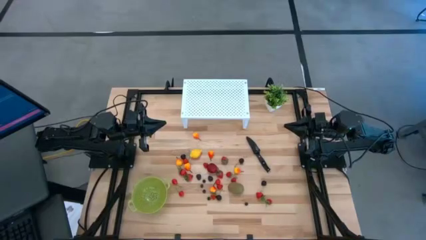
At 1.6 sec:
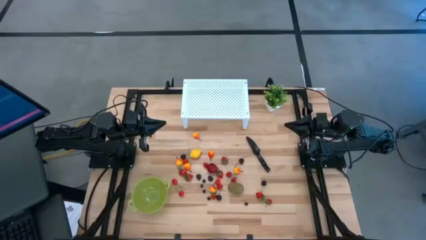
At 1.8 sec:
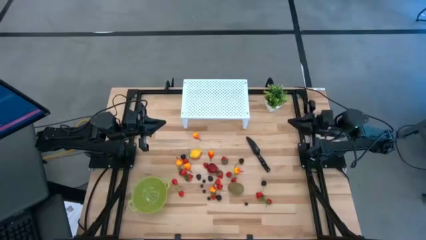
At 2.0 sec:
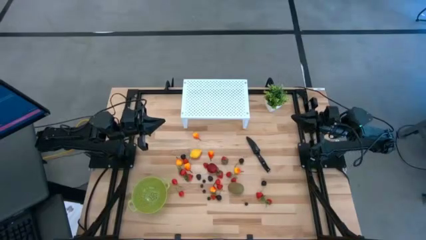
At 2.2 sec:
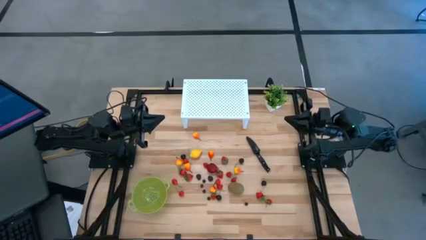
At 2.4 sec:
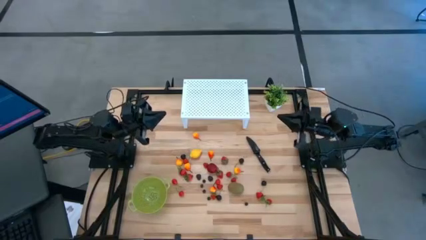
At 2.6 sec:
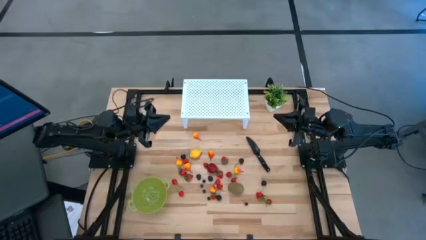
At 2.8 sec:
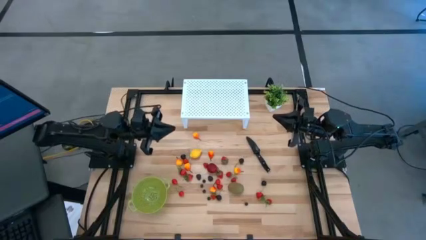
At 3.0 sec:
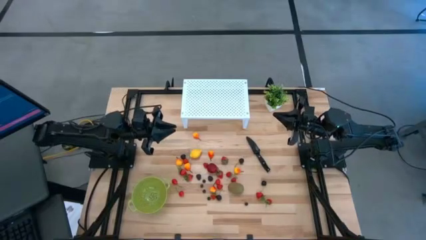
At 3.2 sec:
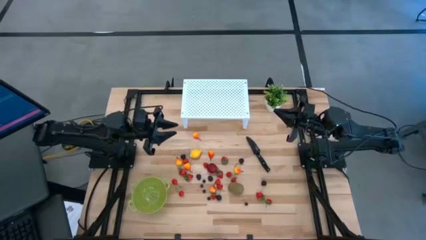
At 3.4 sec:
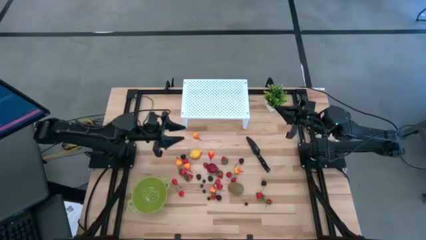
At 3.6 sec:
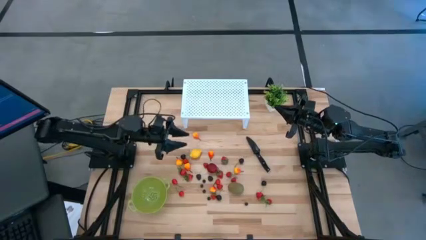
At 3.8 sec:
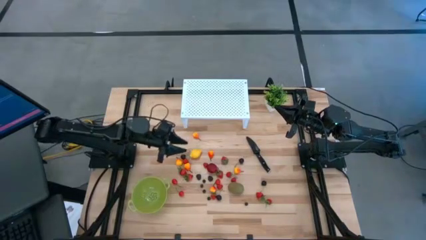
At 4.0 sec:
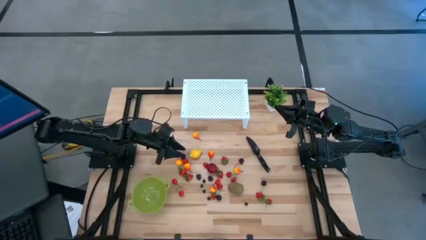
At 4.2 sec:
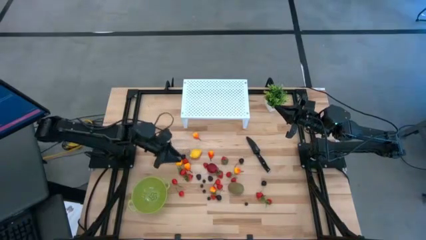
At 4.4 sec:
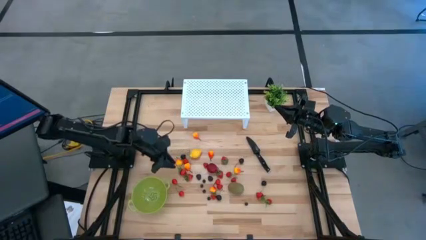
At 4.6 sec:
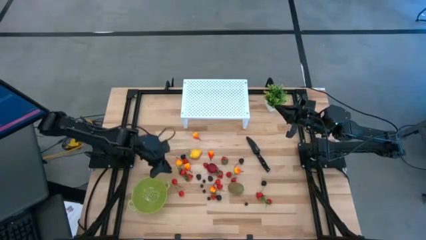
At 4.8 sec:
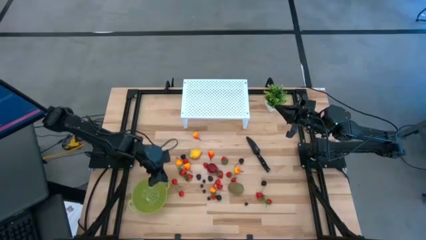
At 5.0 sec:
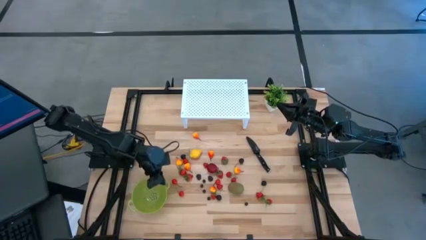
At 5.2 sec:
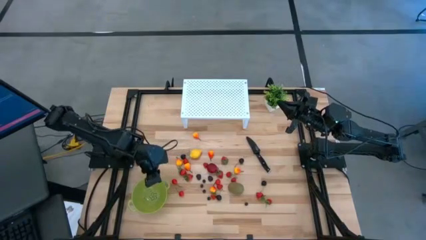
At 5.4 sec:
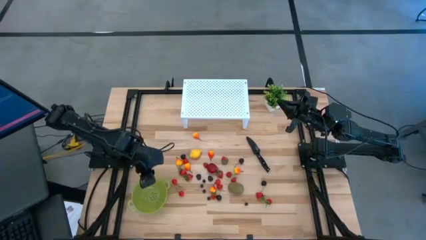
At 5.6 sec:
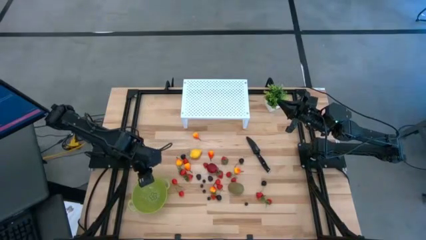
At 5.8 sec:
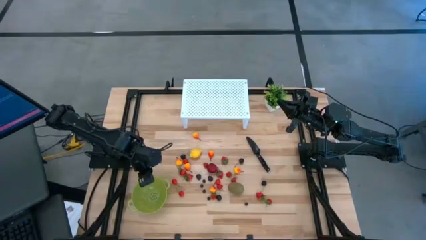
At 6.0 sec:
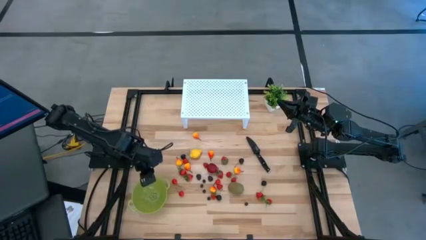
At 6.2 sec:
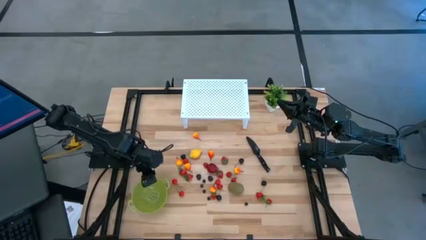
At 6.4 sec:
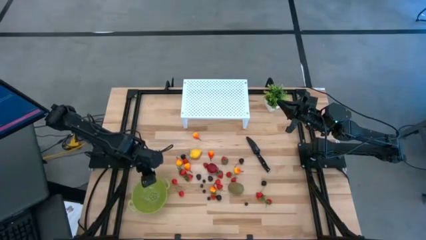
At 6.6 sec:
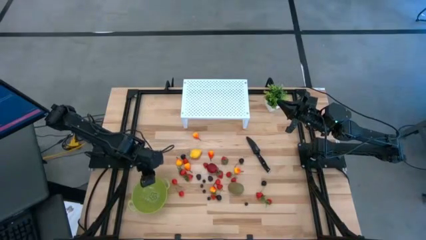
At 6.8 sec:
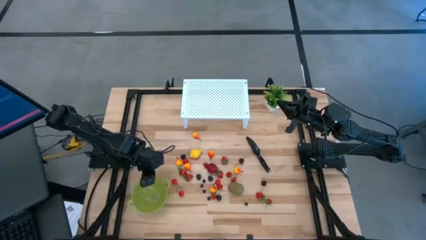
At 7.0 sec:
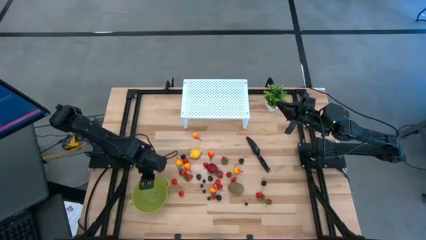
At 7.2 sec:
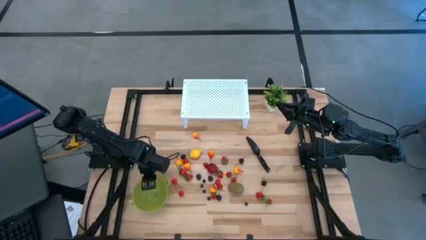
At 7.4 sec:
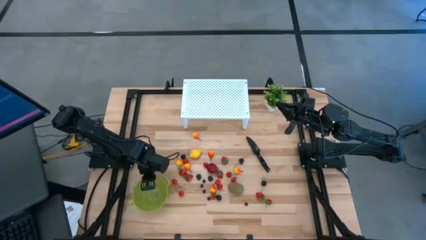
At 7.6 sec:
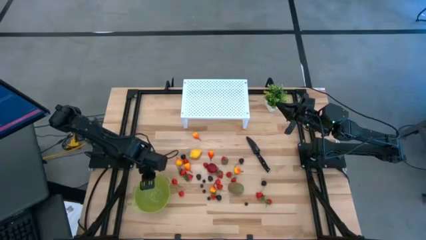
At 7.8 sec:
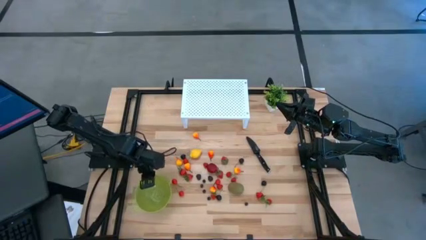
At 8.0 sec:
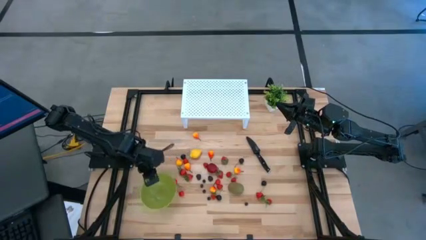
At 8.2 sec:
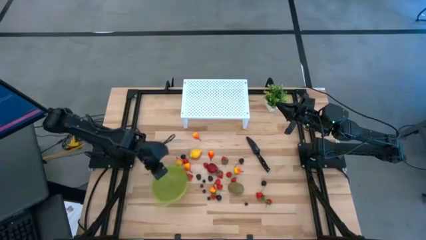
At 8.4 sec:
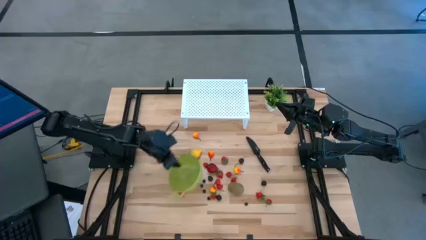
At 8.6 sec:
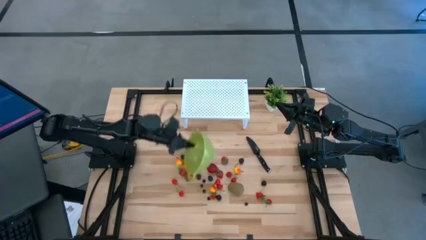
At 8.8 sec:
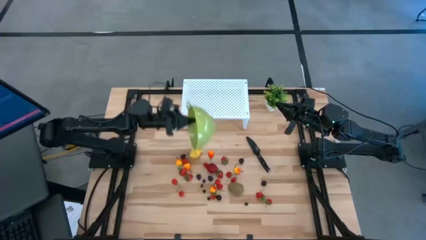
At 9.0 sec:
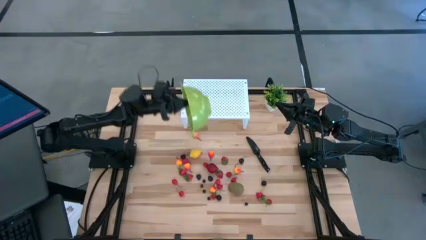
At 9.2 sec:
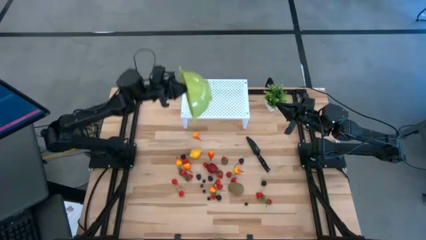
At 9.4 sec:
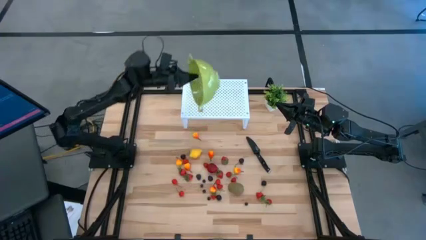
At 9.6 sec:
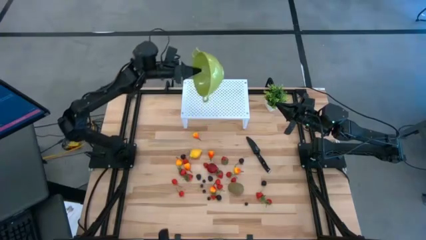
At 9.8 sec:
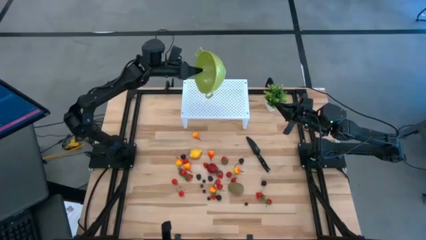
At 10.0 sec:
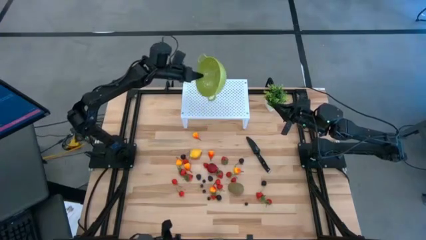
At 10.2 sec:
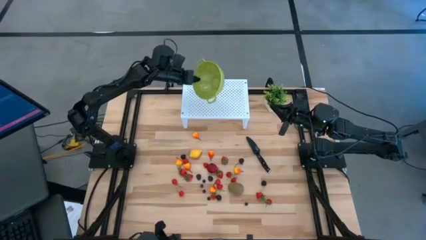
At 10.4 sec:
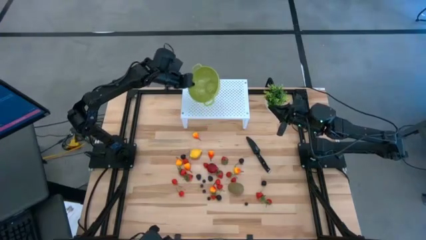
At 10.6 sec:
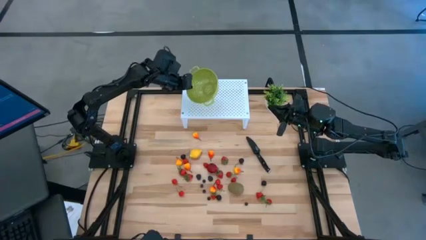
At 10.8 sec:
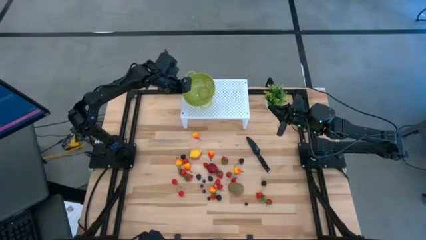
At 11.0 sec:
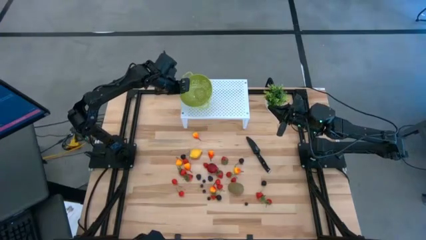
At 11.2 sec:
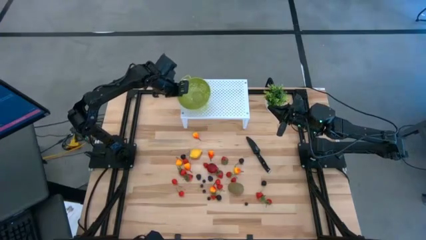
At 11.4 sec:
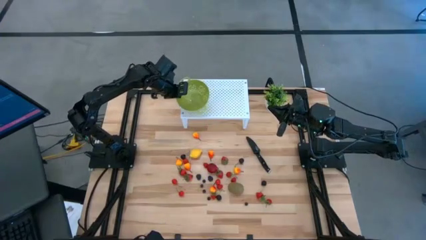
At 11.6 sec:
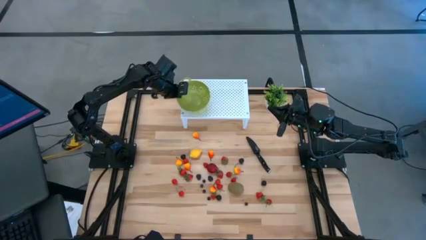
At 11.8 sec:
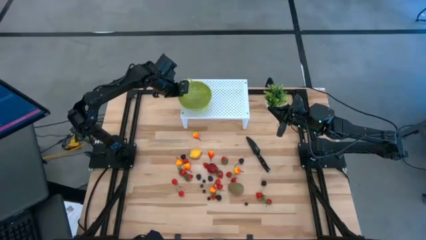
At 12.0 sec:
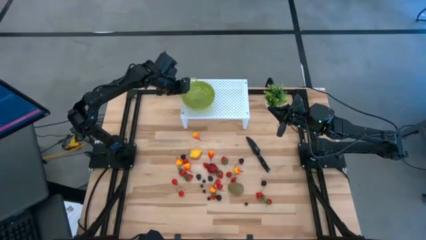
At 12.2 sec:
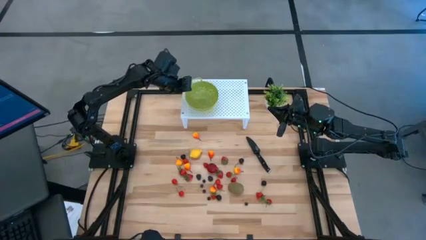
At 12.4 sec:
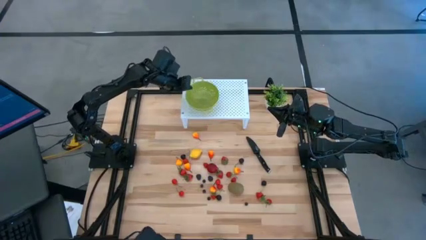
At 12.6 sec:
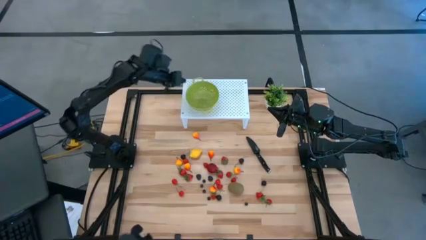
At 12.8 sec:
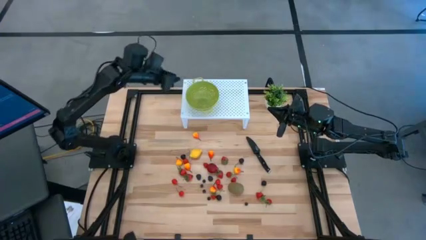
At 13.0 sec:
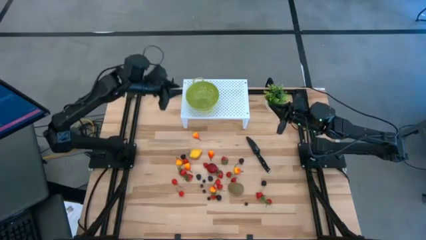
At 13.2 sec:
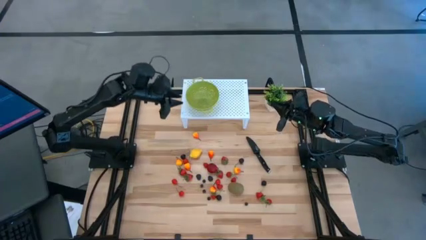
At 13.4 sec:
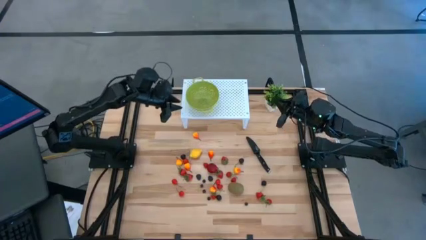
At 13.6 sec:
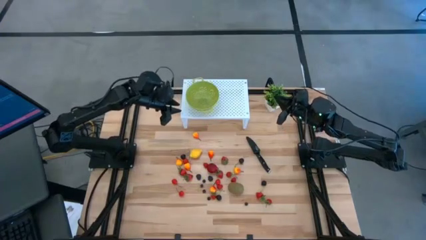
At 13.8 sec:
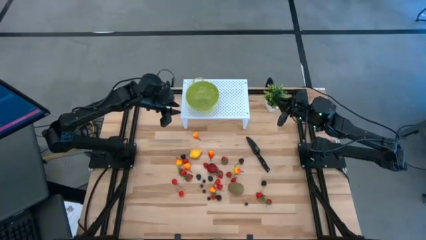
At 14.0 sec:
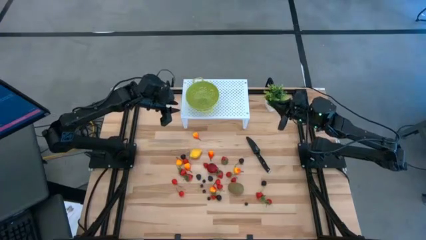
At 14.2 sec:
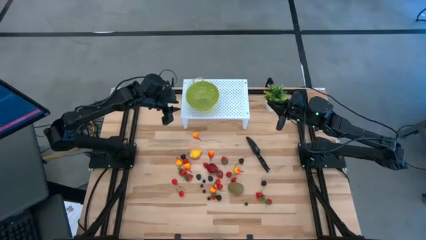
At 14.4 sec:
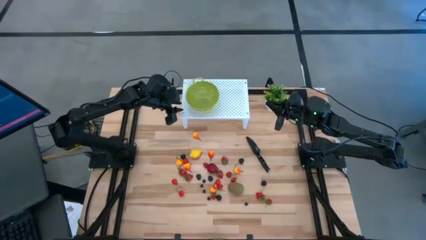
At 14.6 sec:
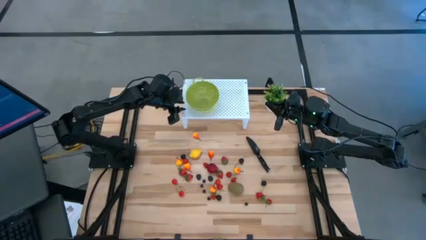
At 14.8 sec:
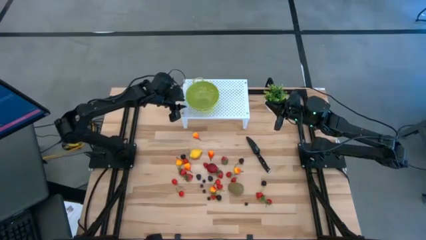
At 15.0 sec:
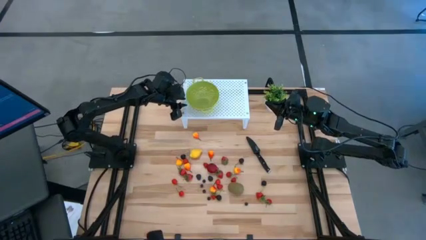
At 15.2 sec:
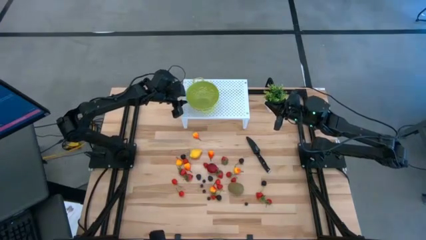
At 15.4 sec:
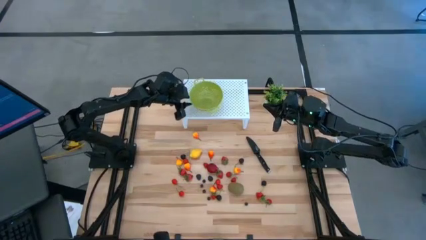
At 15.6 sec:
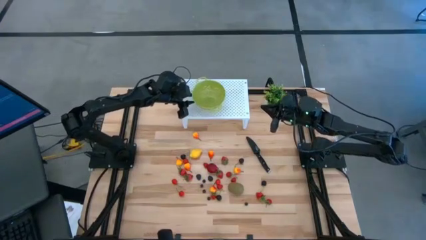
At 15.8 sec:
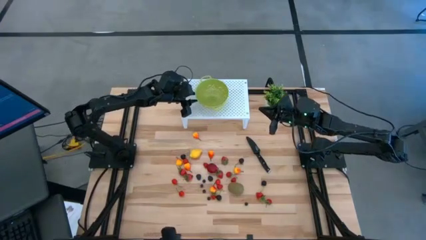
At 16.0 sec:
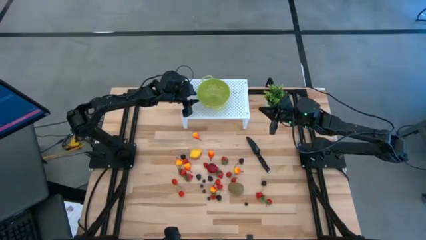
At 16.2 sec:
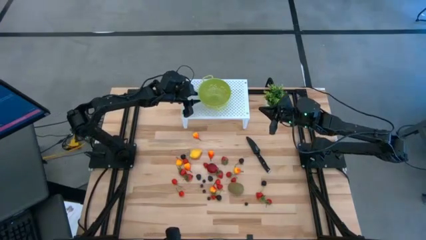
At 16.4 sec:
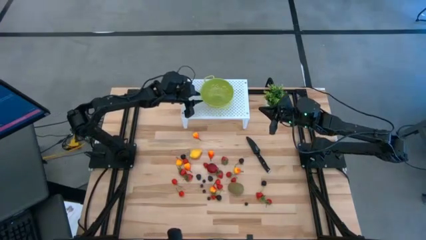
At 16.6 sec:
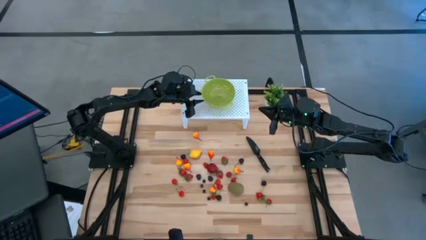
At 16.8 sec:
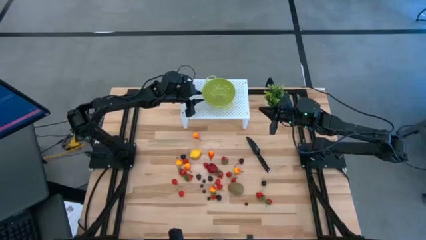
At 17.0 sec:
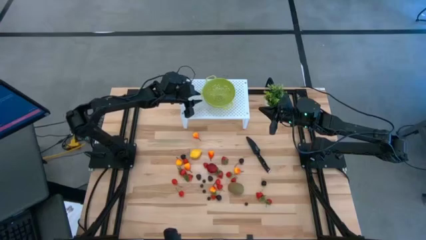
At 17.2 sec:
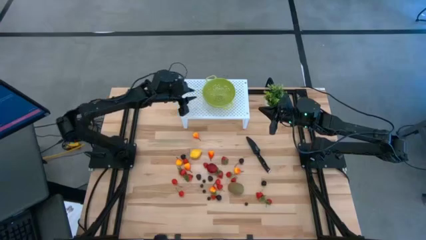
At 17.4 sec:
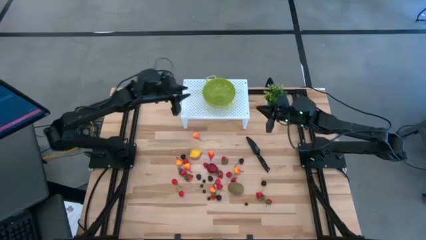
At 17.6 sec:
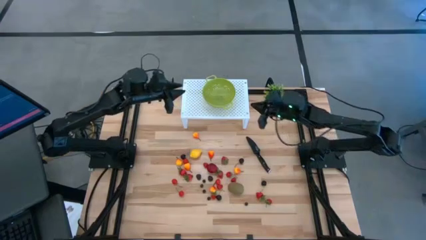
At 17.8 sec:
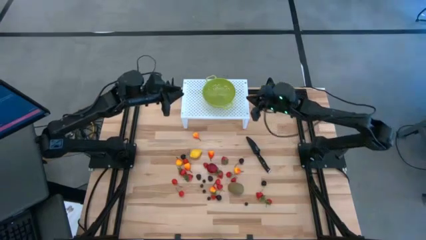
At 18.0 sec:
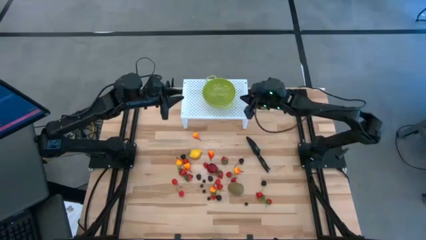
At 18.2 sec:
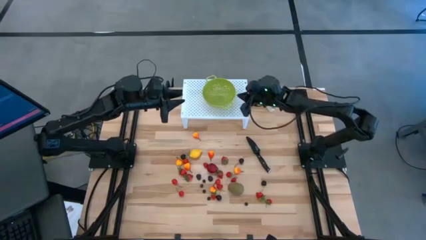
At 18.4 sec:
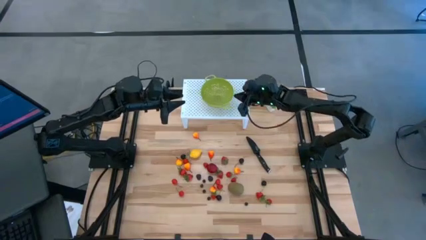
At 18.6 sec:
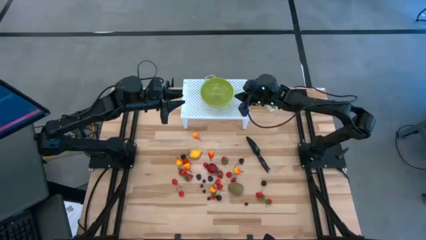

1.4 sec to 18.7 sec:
Task: Pick & Place Fruit
Put the green strainer bowl on the shelf
